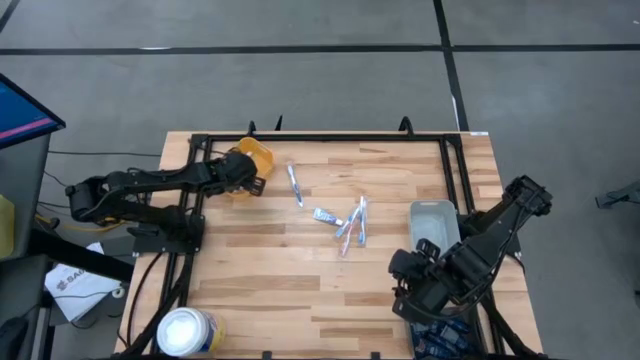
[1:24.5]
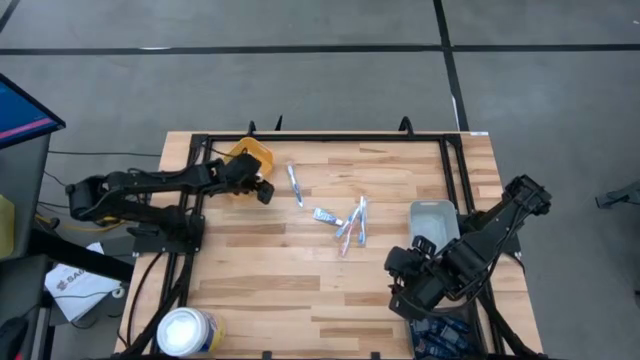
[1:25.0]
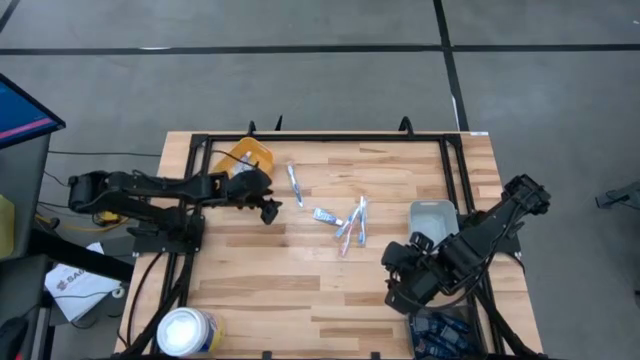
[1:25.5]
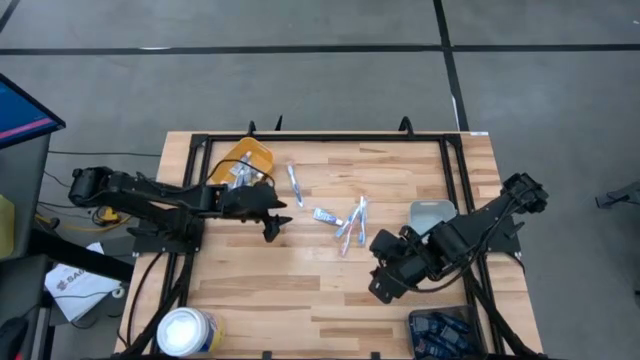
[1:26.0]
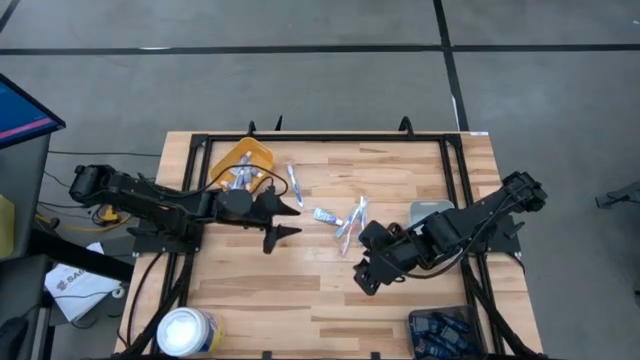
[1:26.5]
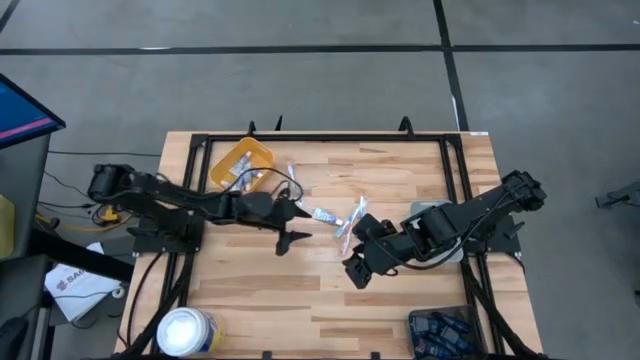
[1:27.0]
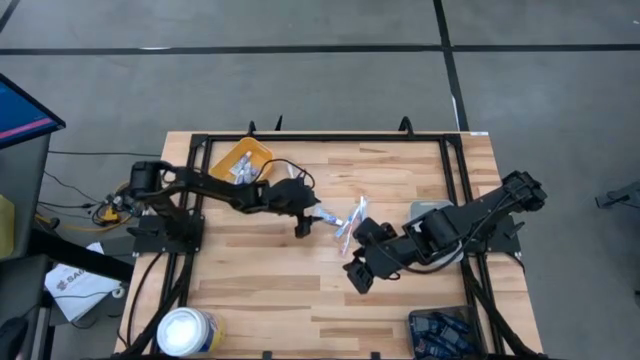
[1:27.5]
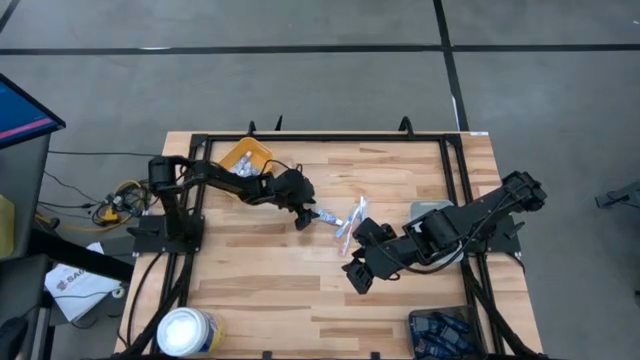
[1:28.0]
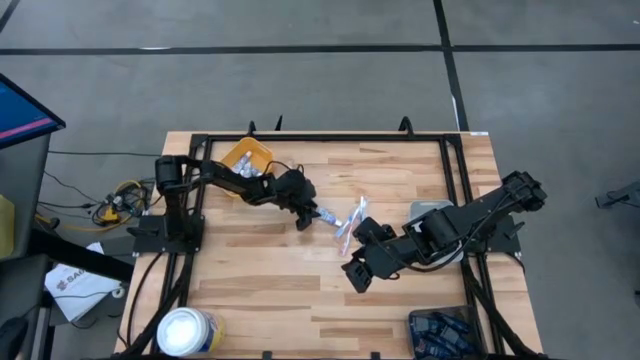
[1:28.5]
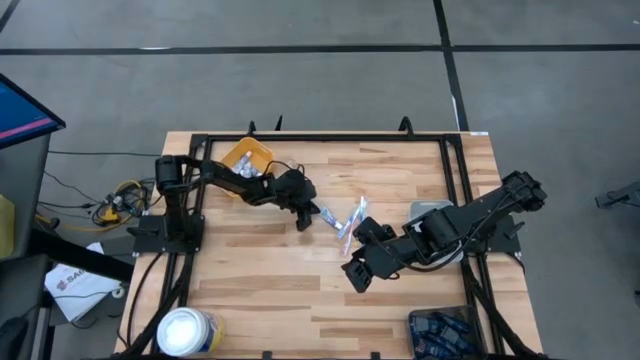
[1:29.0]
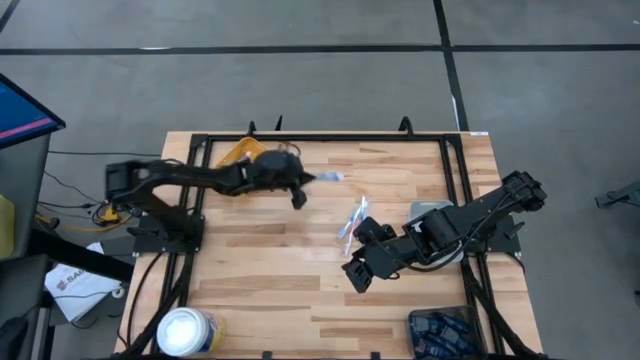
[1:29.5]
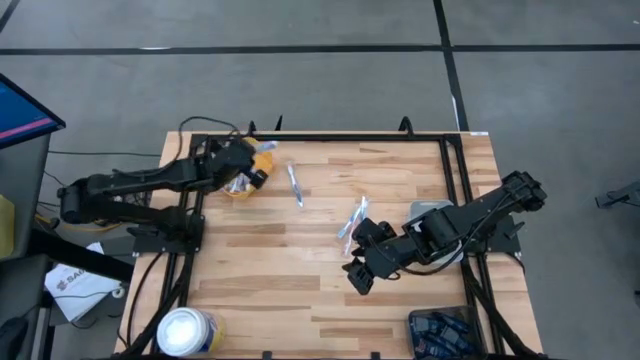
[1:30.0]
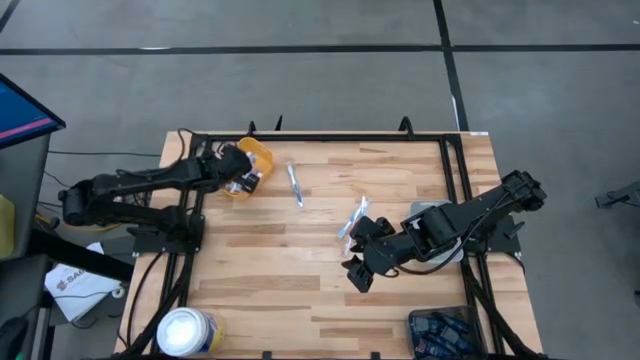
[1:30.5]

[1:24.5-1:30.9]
Task: Pick & Place Travel size toiletries
Put the white toothpaste into the yellow bin

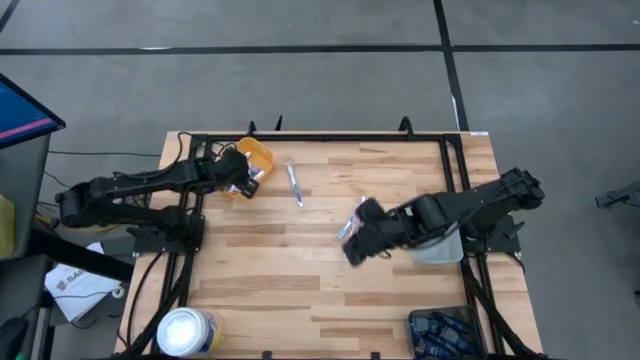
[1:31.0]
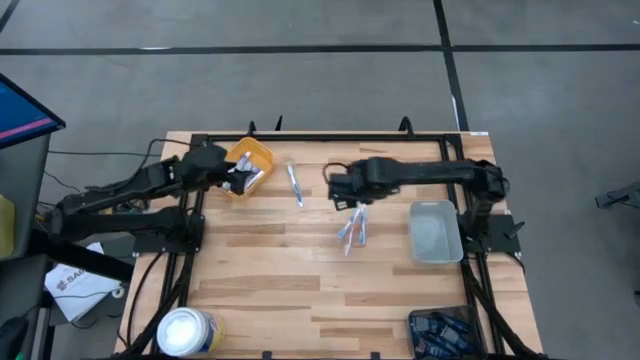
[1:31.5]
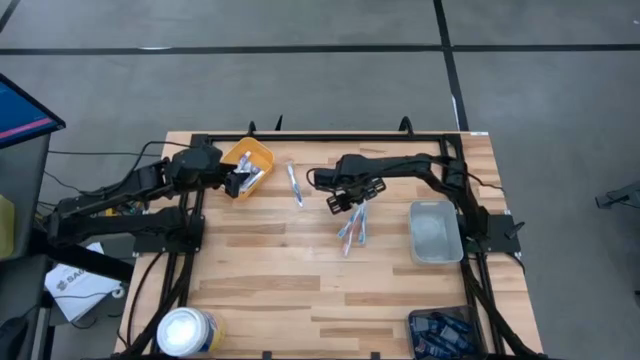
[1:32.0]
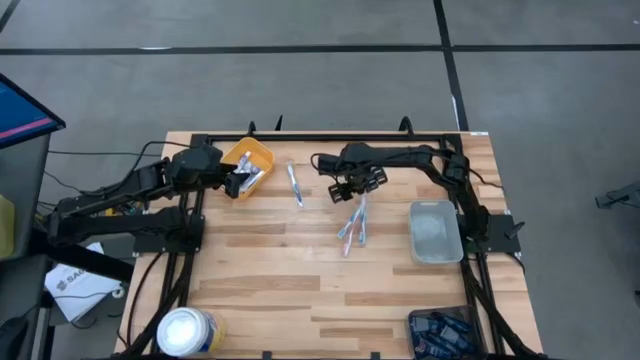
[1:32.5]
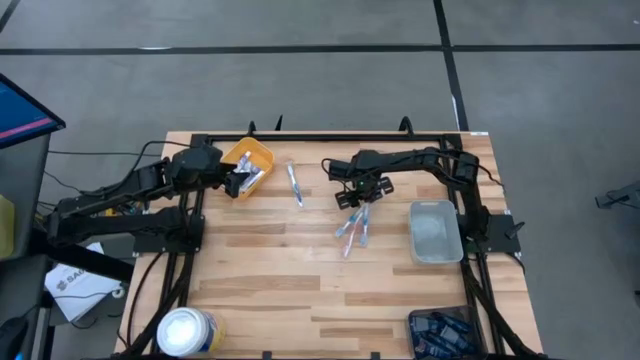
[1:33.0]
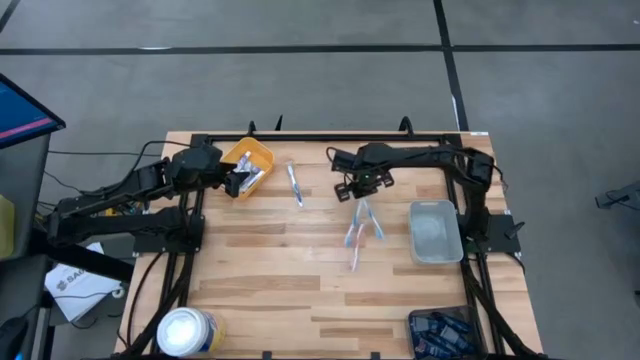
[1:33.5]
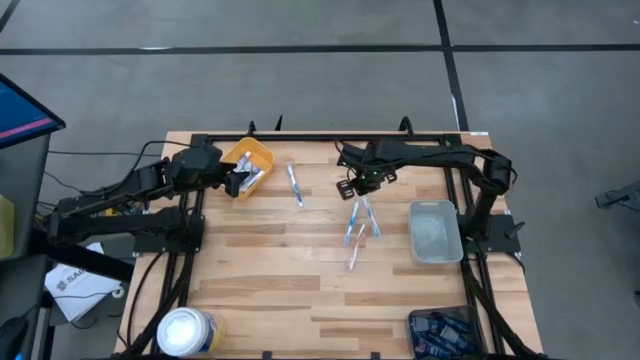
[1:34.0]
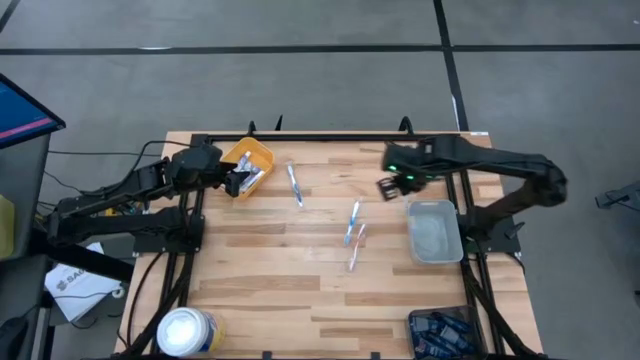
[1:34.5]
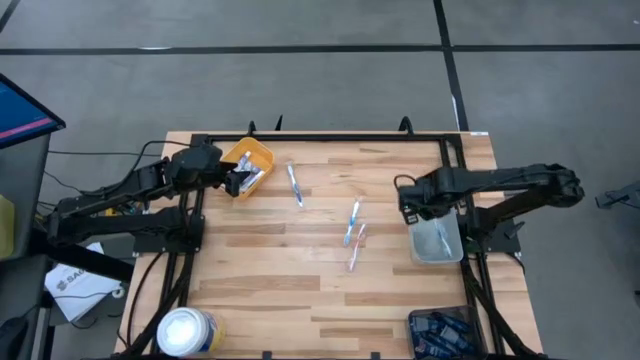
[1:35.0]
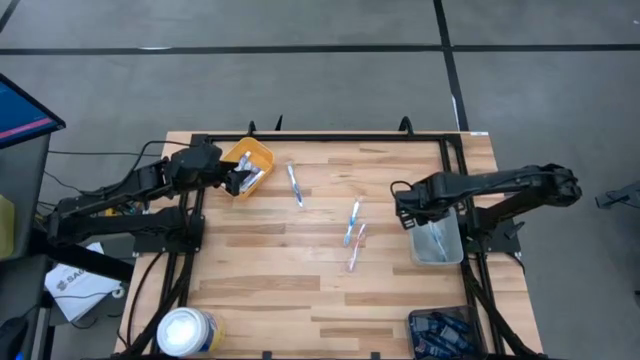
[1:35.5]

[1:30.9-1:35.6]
Put the blue toothbrush into the gray bin

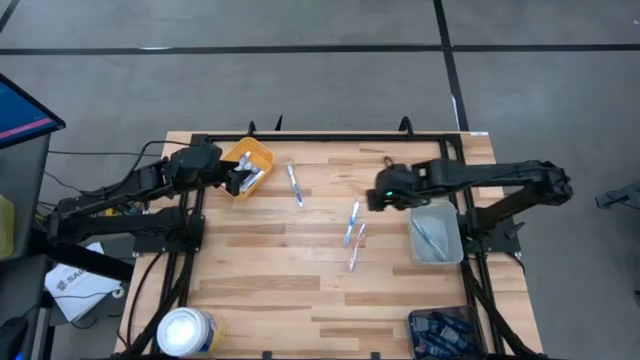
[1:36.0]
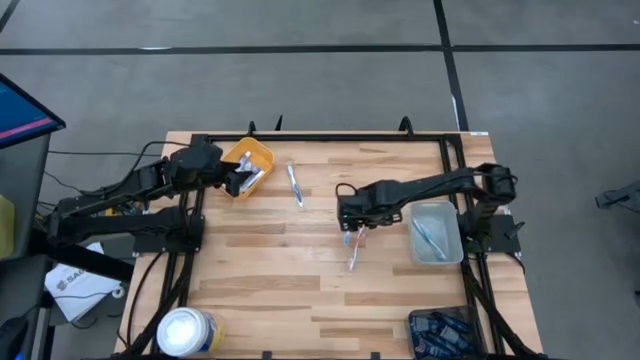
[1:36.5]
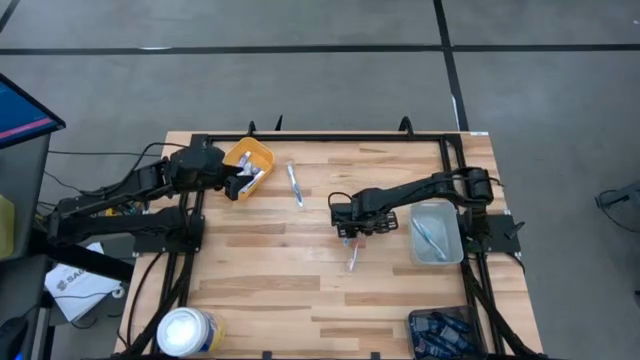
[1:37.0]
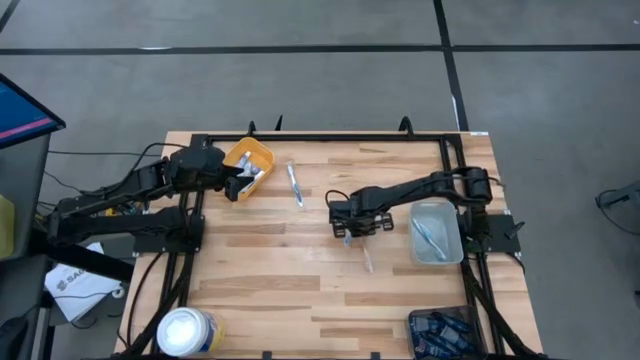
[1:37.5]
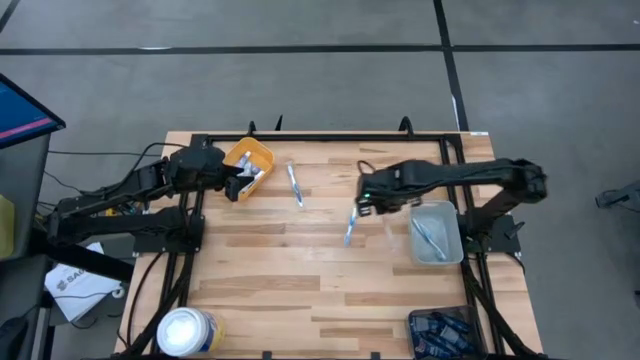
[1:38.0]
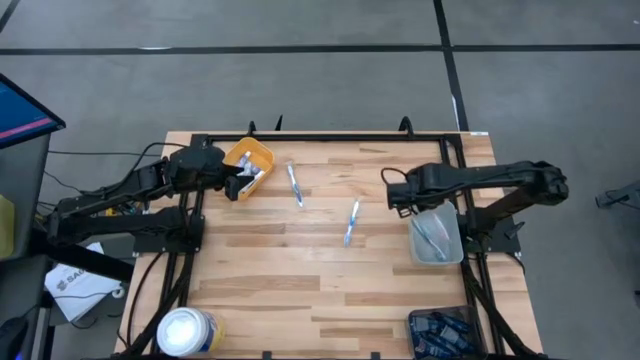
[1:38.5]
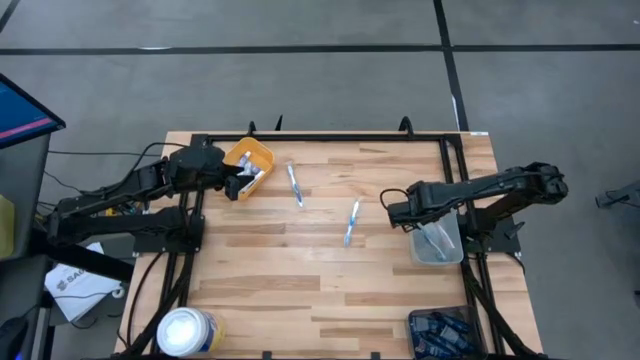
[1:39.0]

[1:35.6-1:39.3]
Put the orange toothbrush into the gray bin

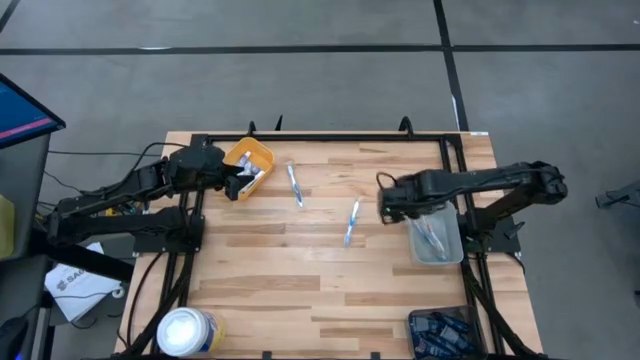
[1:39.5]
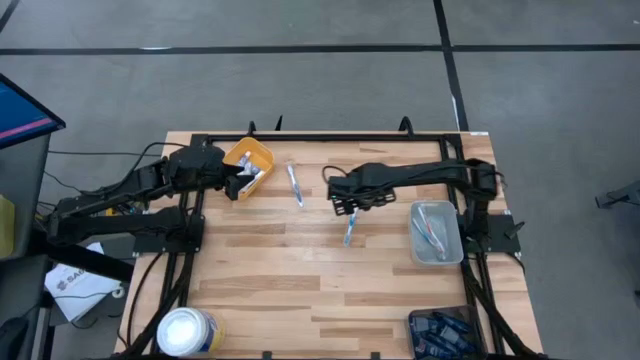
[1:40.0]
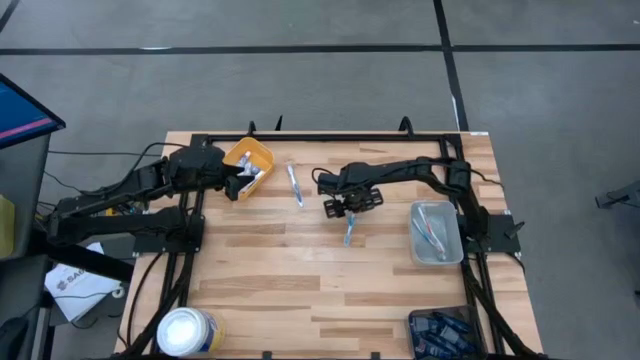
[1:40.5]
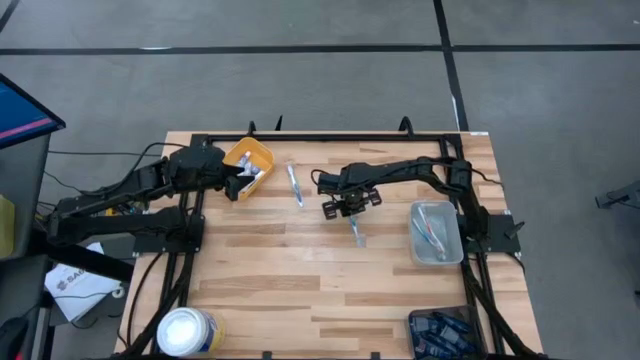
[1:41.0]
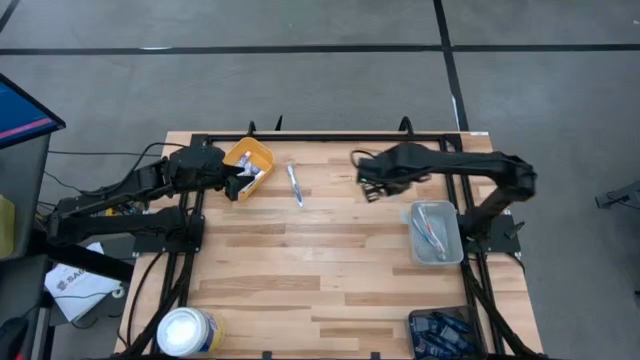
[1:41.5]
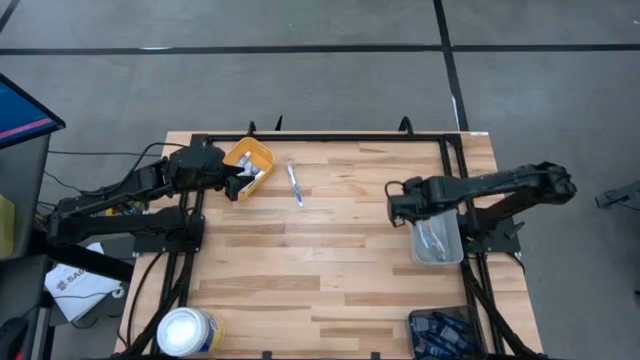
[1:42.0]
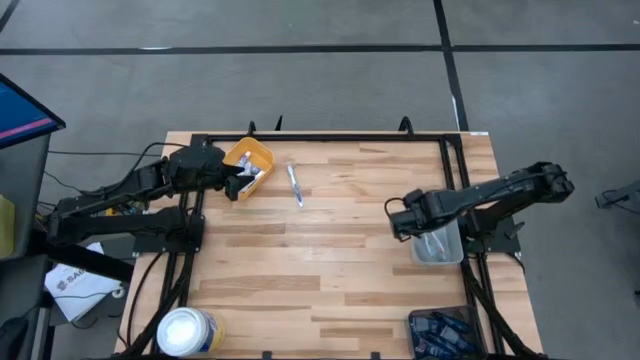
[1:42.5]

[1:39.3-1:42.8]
Put the blue toothbrush into the gray bin

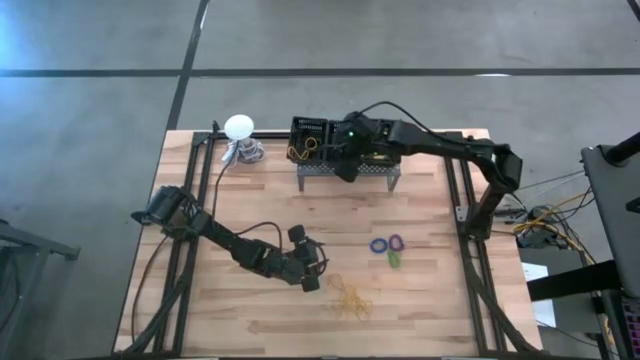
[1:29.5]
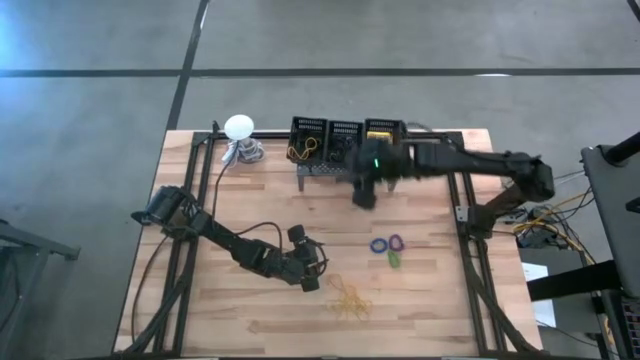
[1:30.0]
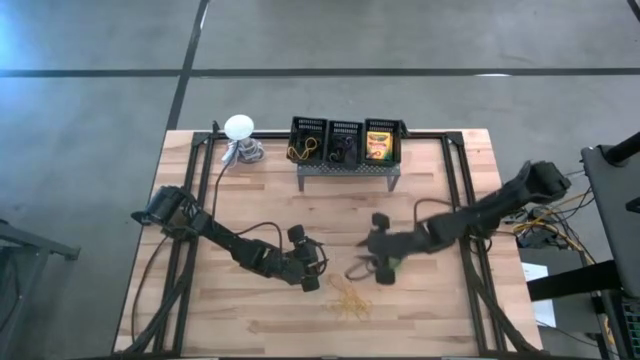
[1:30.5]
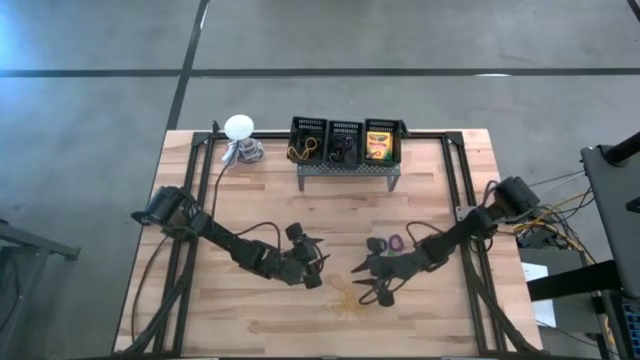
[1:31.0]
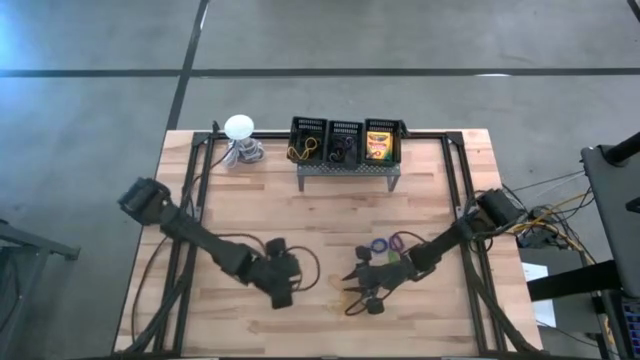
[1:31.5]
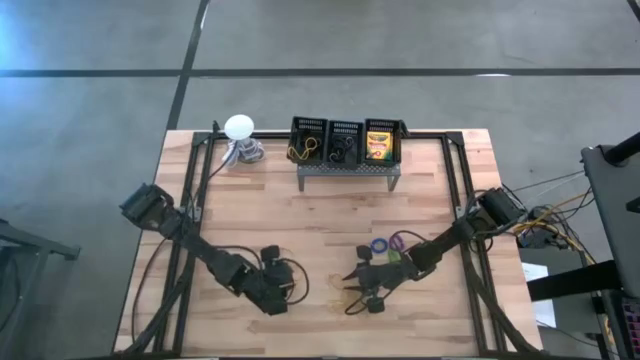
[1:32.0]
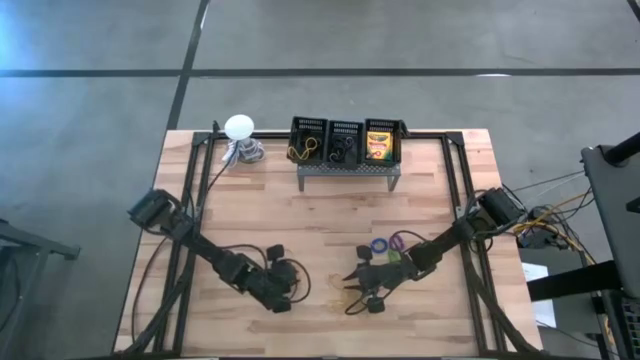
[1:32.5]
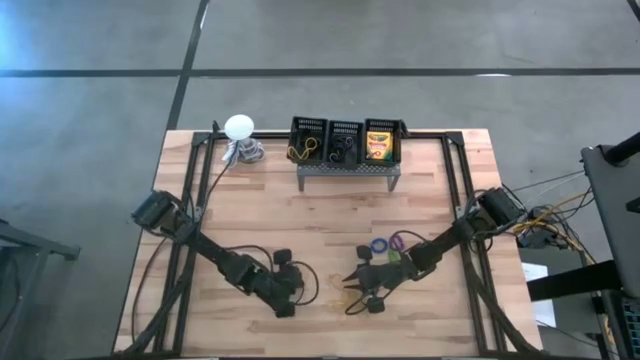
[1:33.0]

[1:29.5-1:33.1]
Task: Pick & Place Office Desk Supplies
Put the yellow rubber band into the left black bin on the shelf
